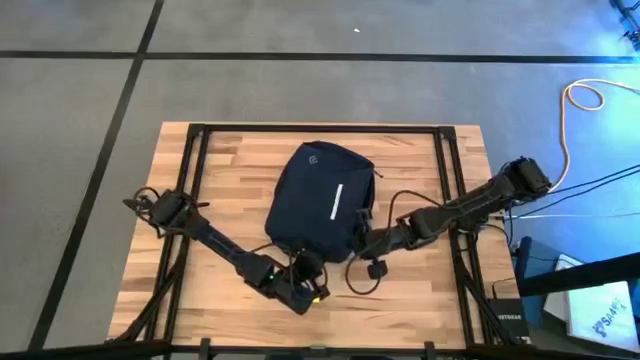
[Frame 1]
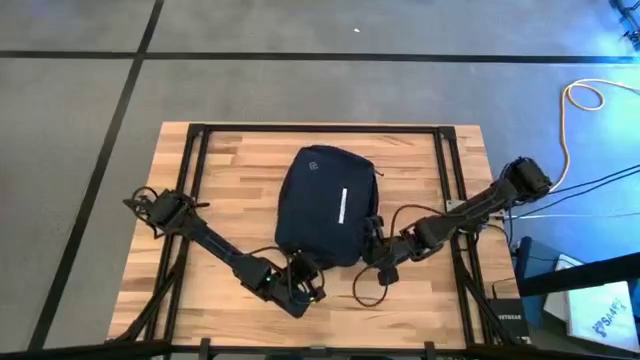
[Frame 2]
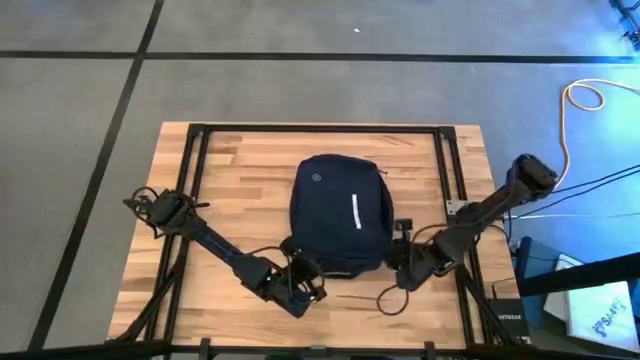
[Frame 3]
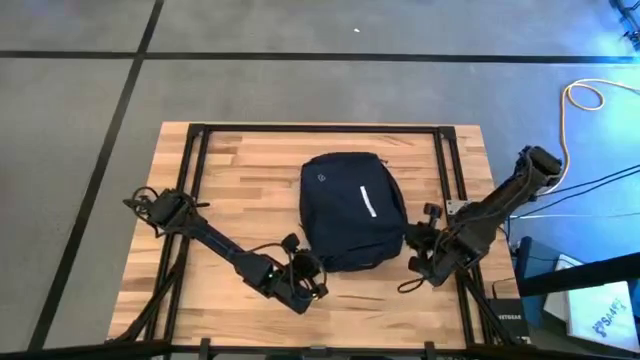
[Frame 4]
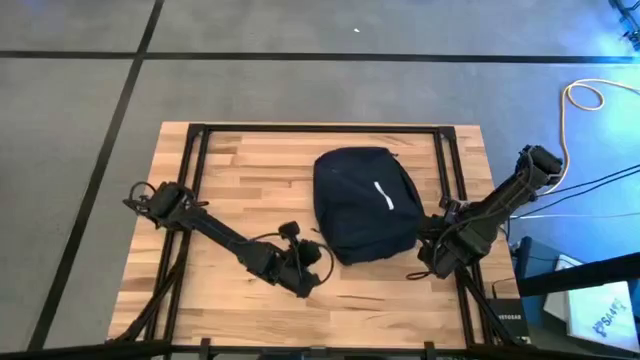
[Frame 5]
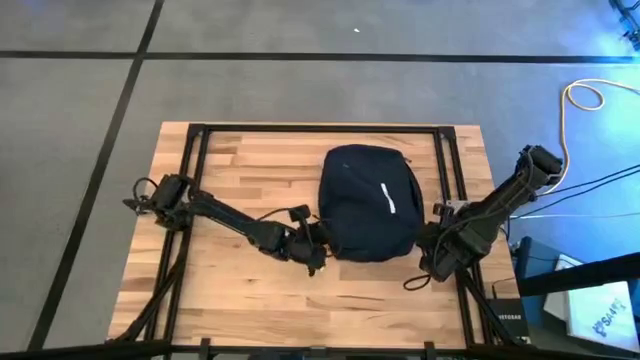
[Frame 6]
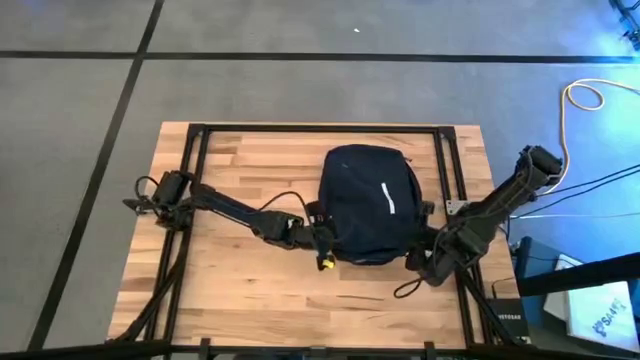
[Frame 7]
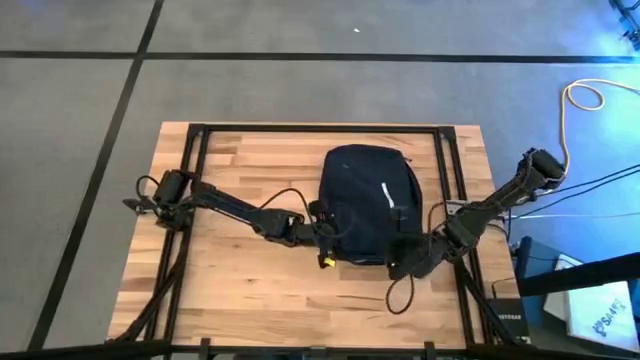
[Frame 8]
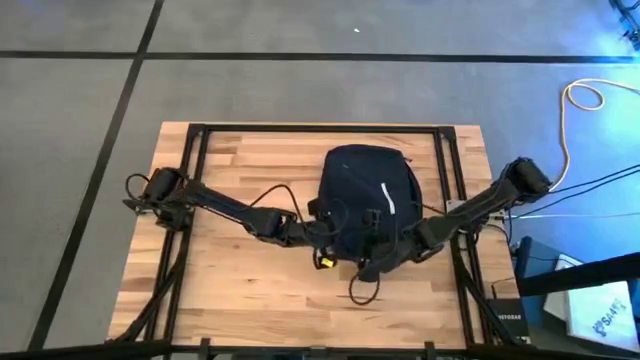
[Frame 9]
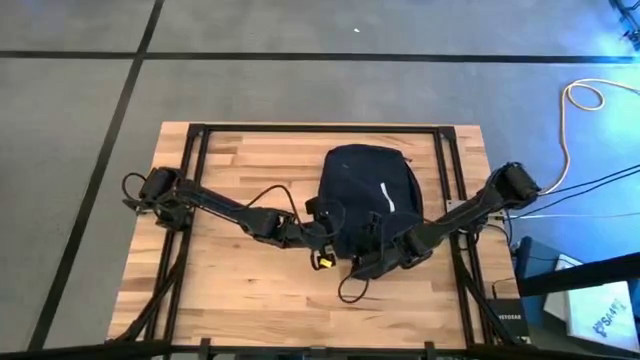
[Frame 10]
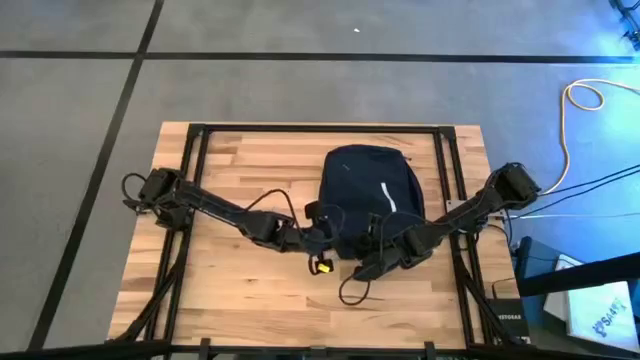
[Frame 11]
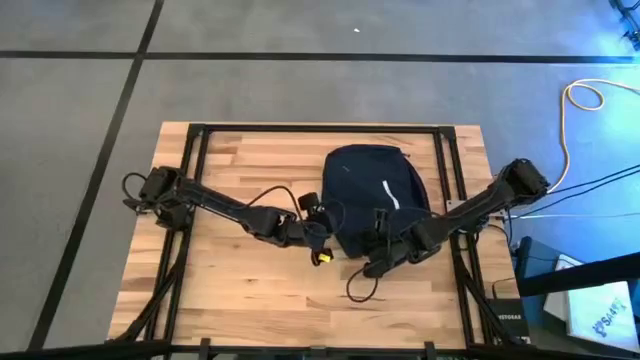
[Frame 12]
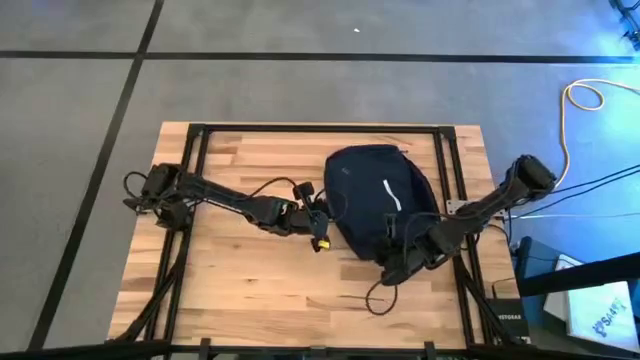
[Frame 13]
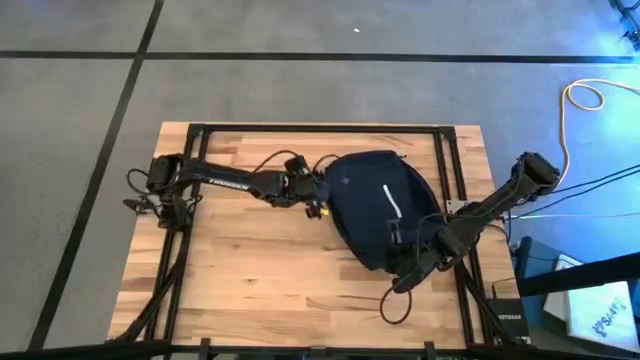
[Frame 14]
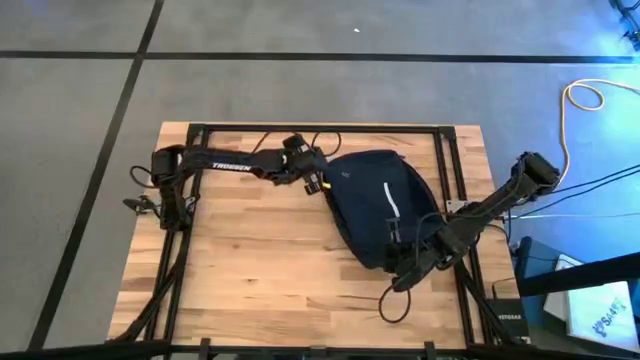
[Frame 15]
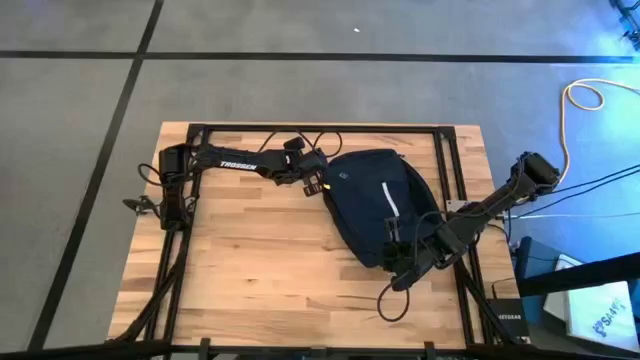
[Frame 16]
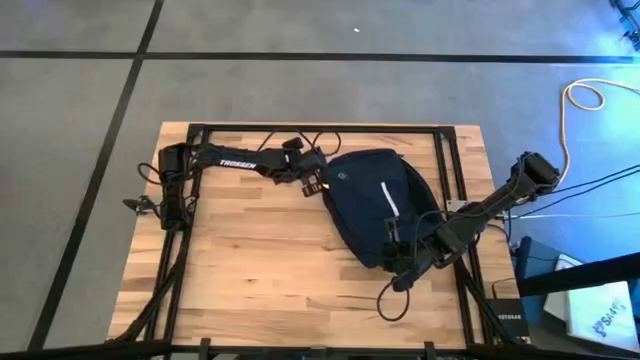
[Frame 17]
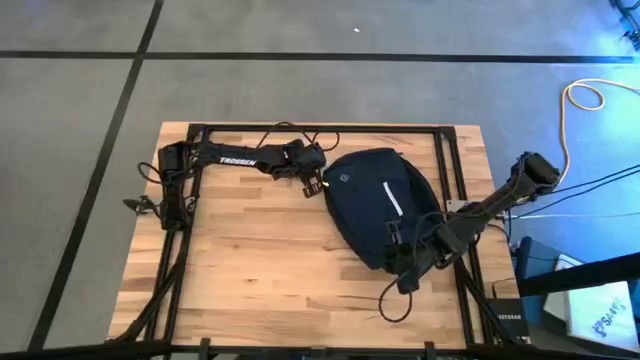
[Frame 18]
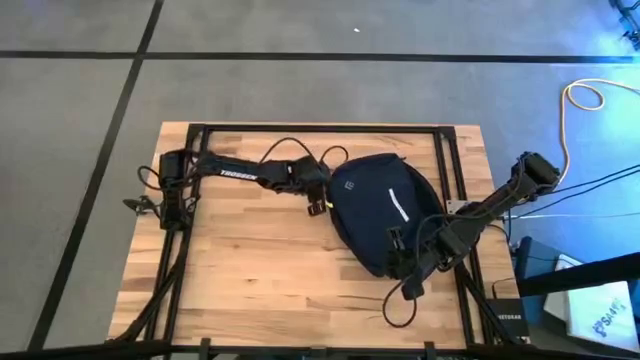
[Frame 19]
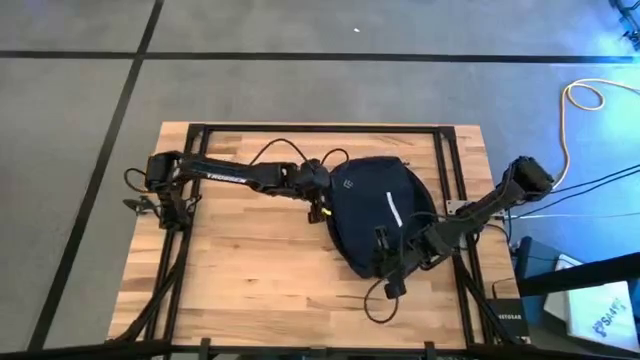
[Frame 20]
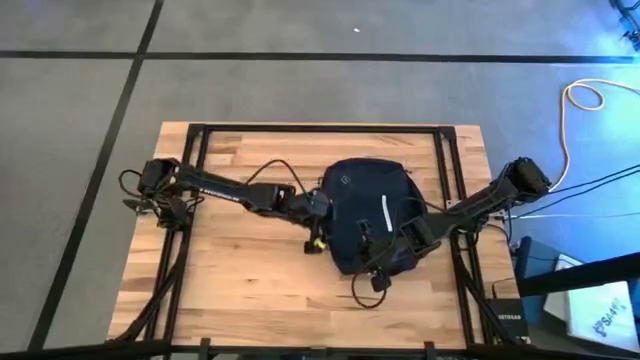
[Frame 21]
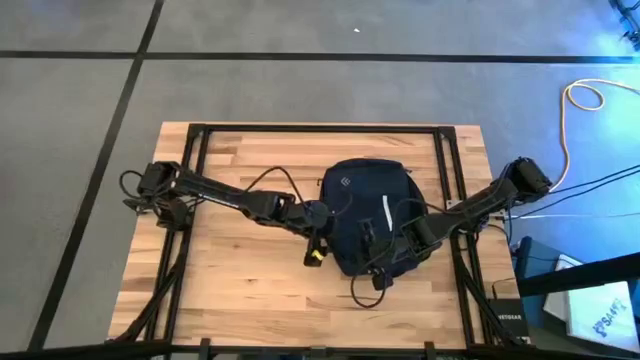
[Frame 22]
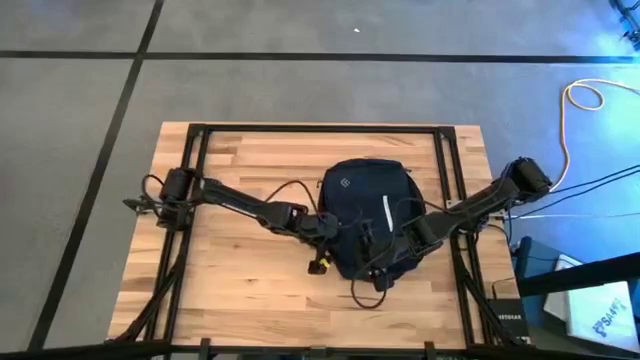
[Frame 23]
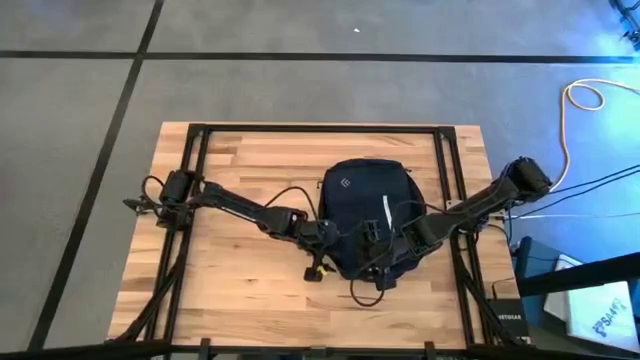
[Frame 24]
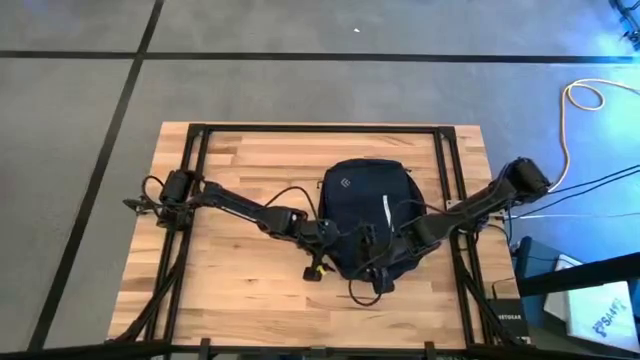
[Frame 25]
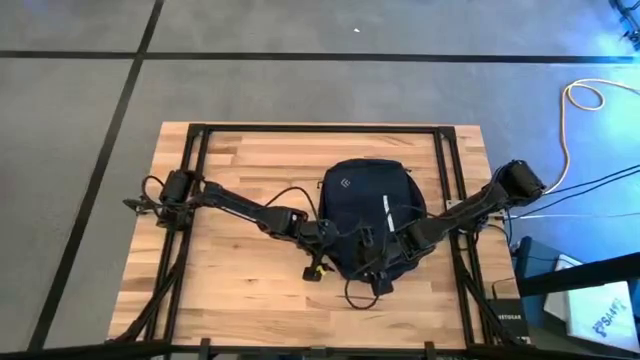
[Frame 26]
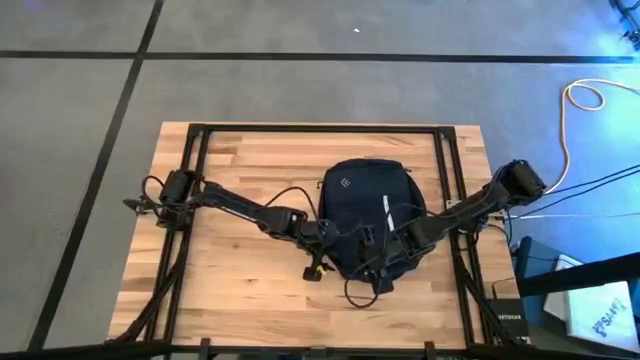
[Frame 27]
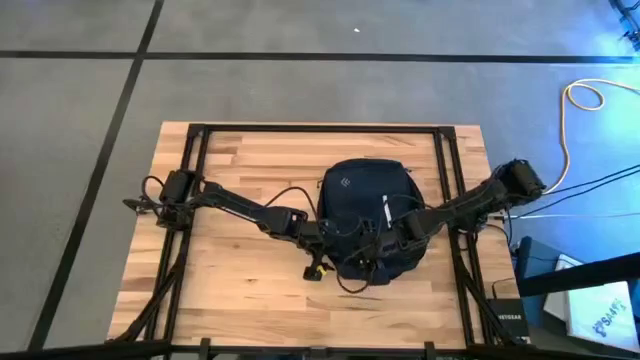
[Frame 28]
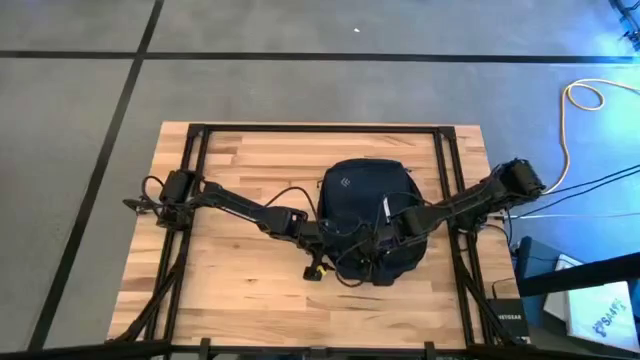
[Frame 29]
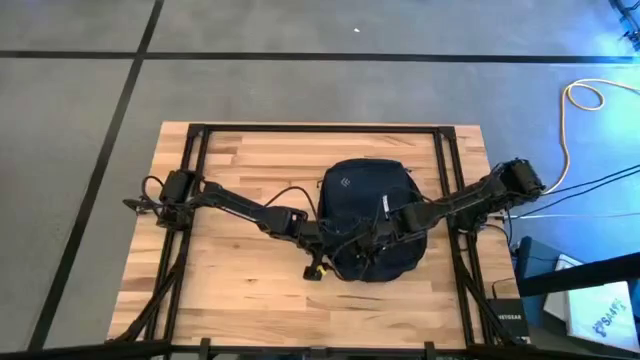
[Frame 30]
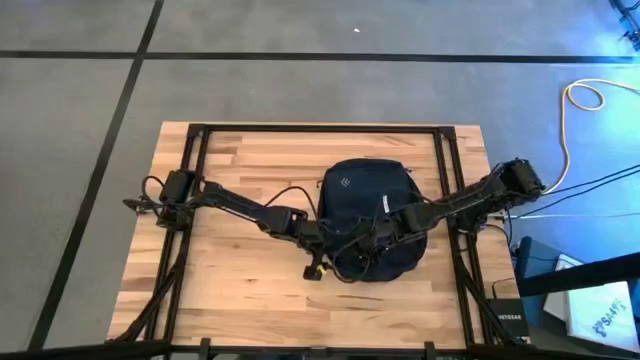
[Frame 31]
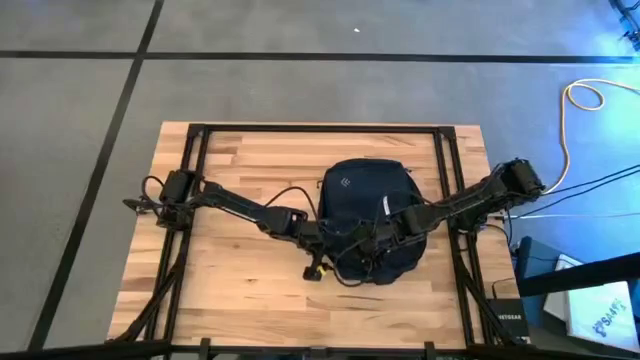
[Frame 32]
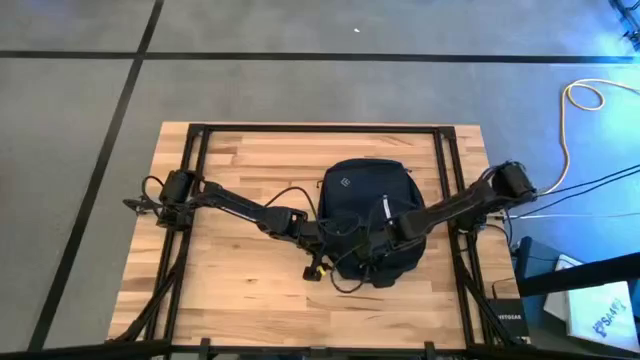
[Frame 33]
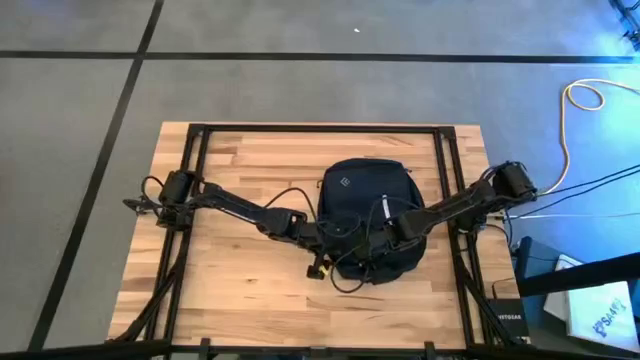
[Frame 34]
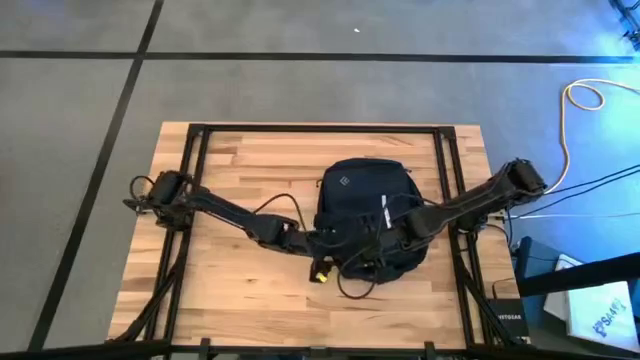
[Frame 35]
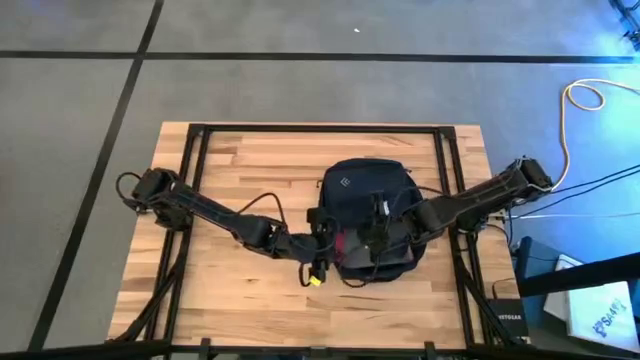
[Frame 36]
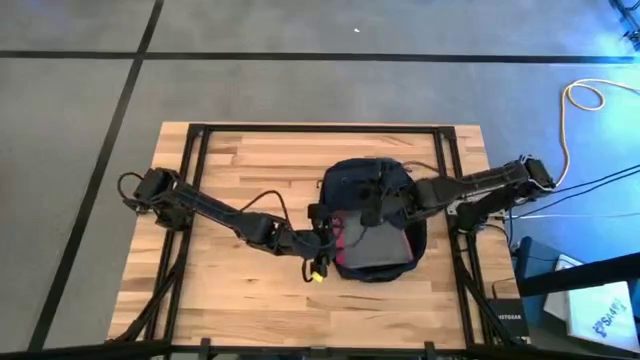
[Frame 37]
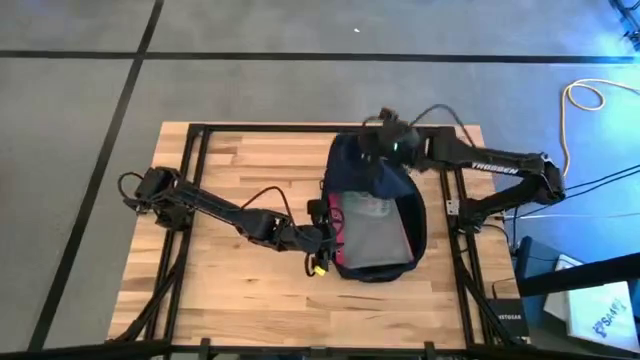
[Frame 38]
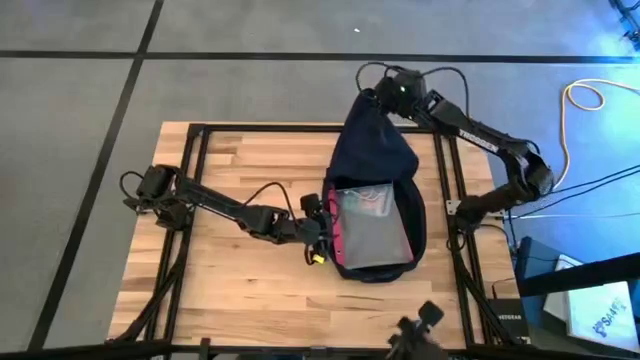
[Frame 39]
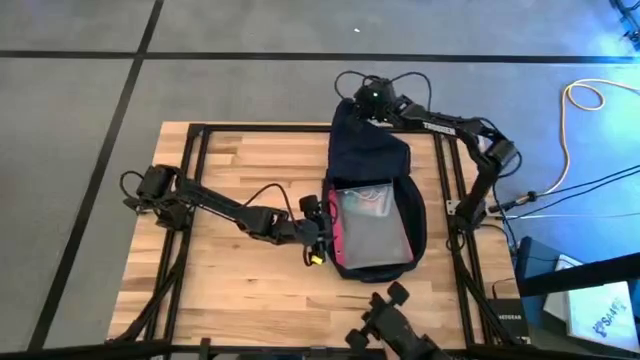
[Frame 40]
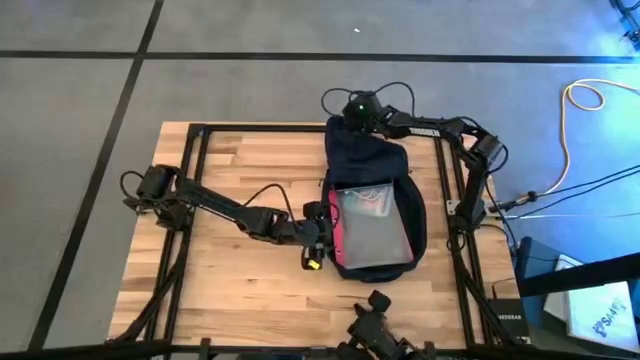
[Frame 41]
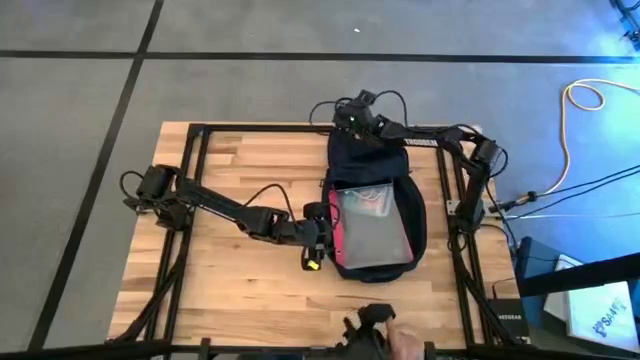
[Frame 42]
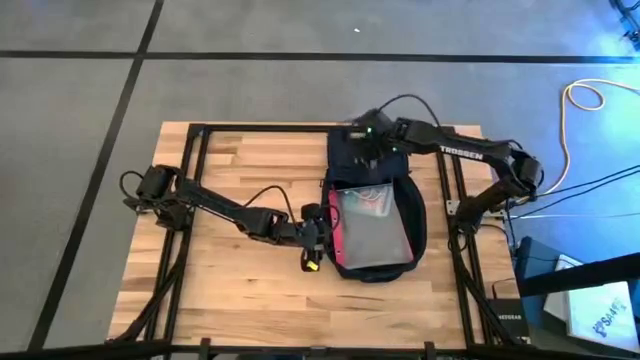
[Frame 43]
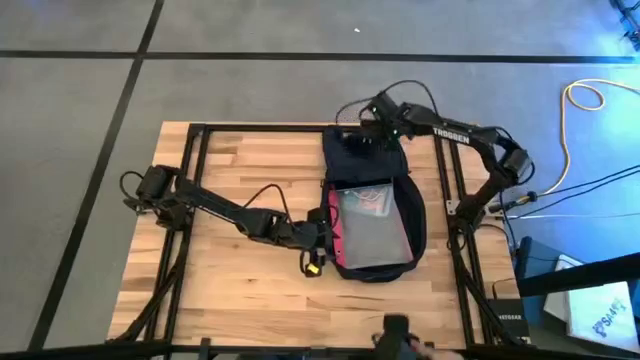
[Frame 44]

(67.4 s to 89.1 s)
Task: Unpack backpack
Open the blue backpack
